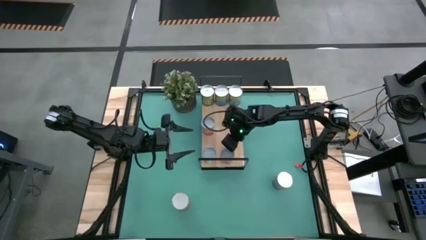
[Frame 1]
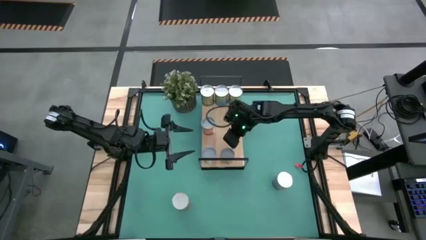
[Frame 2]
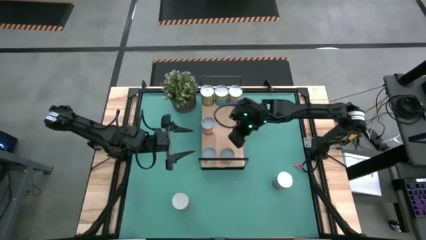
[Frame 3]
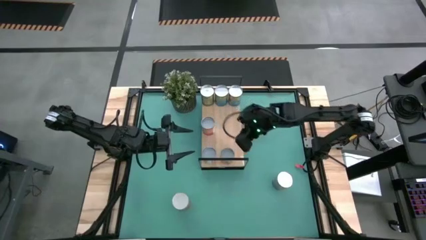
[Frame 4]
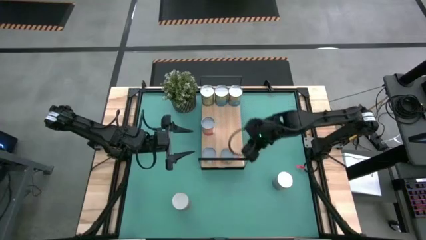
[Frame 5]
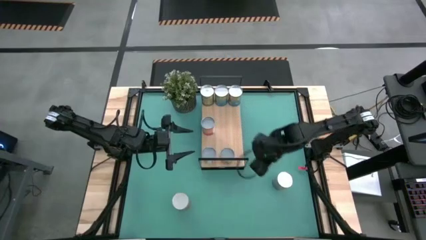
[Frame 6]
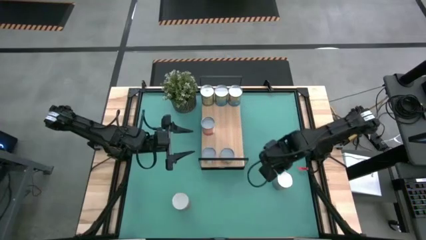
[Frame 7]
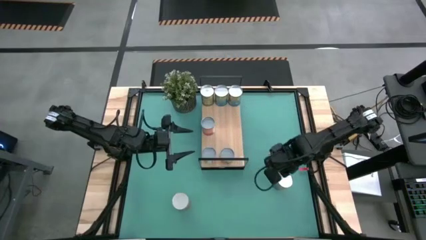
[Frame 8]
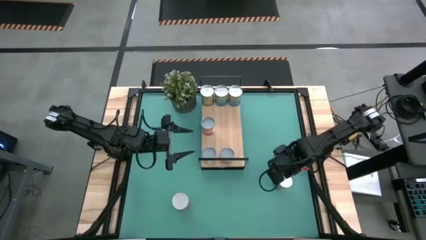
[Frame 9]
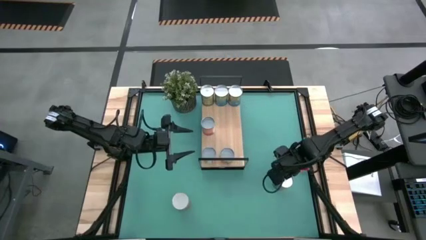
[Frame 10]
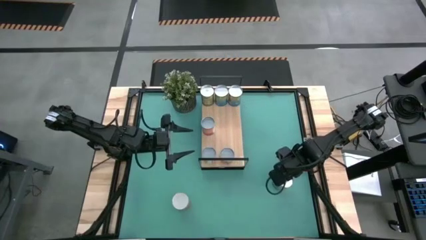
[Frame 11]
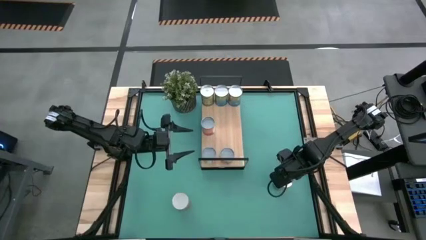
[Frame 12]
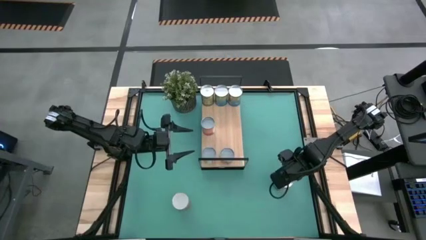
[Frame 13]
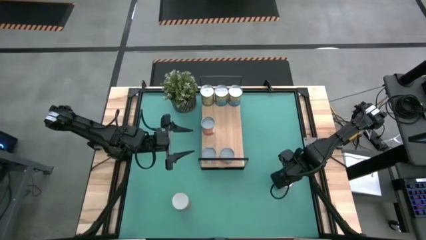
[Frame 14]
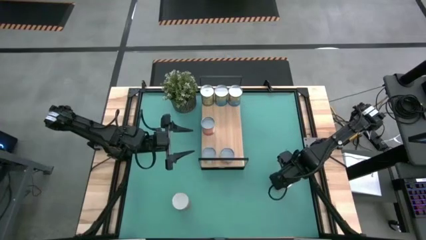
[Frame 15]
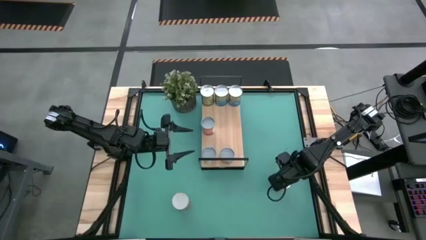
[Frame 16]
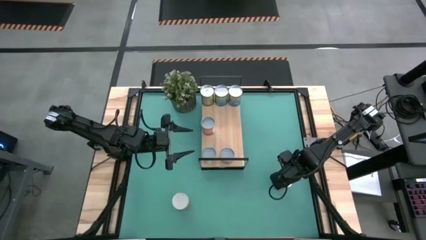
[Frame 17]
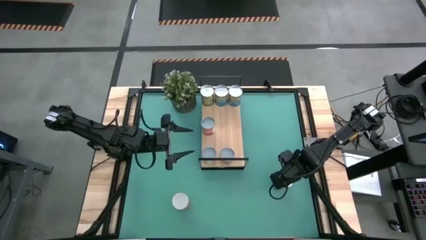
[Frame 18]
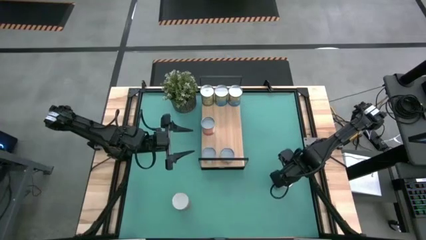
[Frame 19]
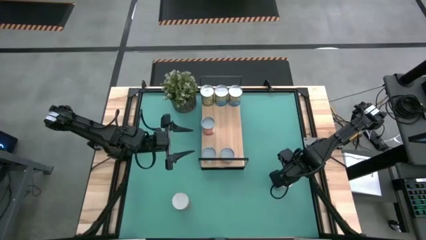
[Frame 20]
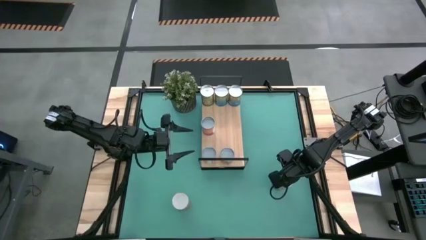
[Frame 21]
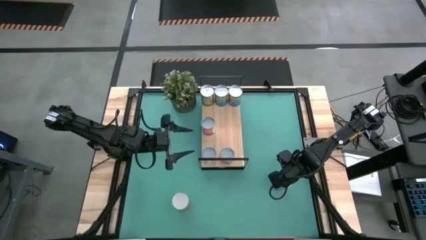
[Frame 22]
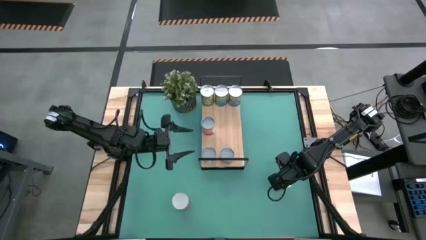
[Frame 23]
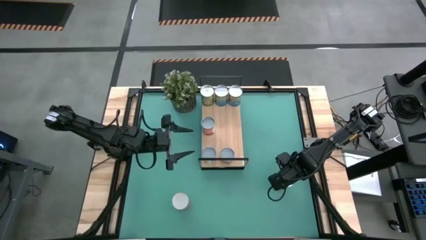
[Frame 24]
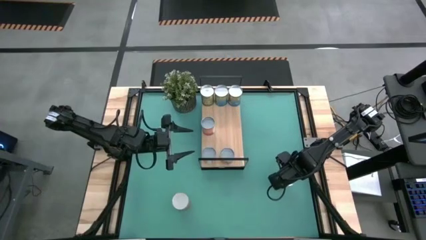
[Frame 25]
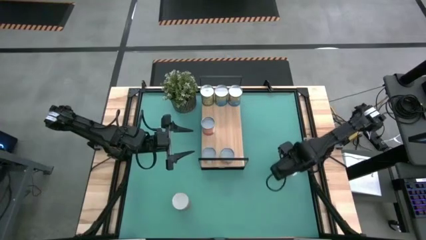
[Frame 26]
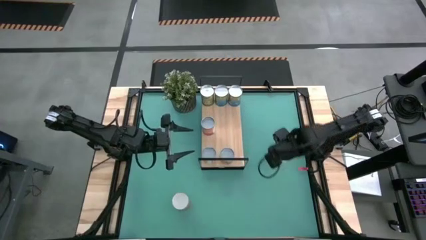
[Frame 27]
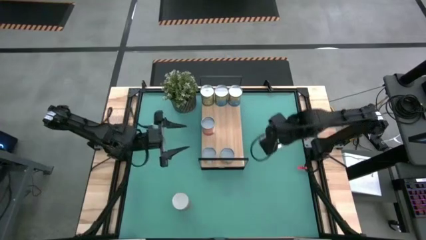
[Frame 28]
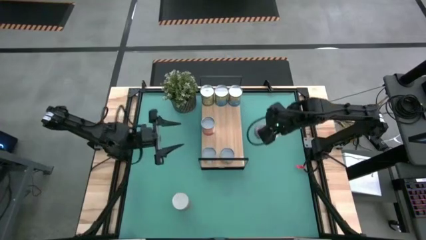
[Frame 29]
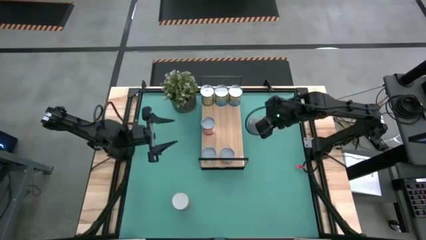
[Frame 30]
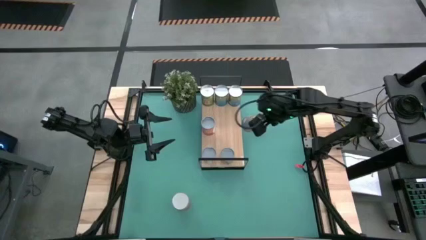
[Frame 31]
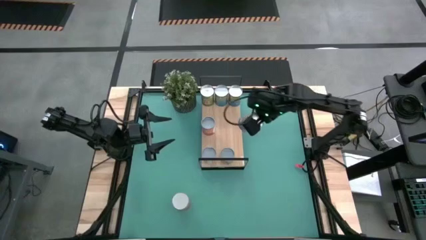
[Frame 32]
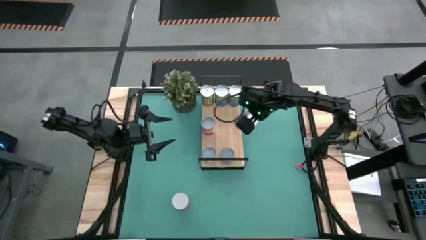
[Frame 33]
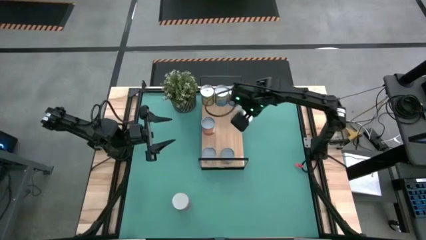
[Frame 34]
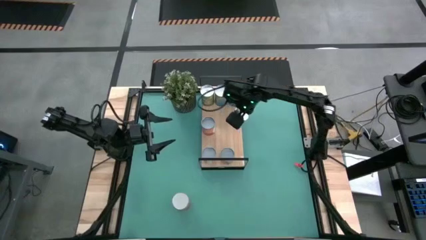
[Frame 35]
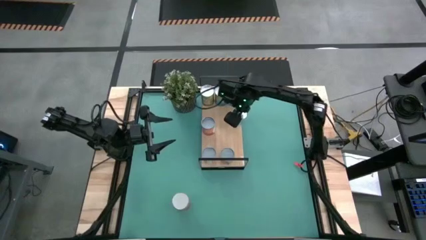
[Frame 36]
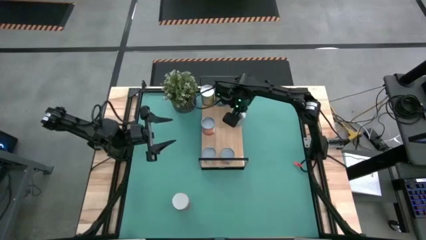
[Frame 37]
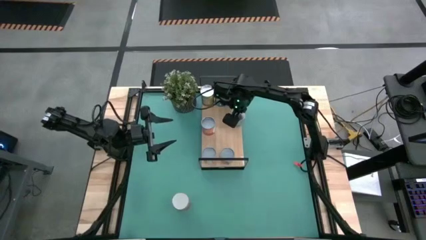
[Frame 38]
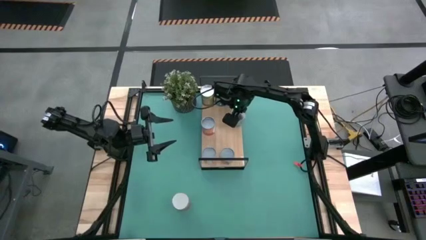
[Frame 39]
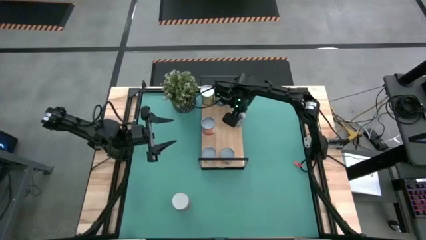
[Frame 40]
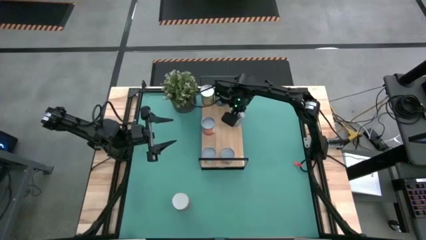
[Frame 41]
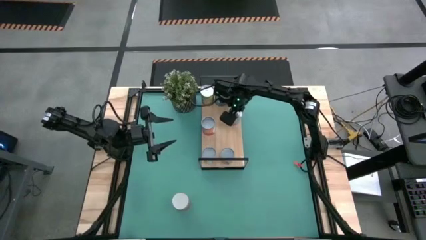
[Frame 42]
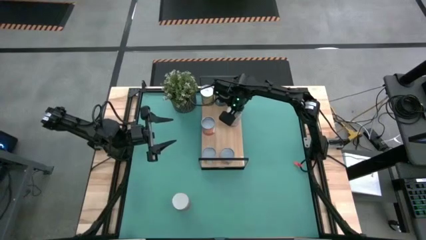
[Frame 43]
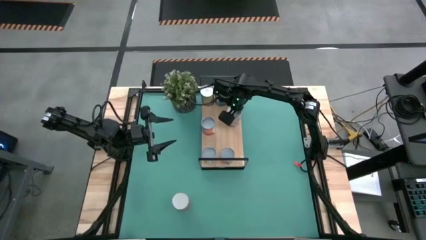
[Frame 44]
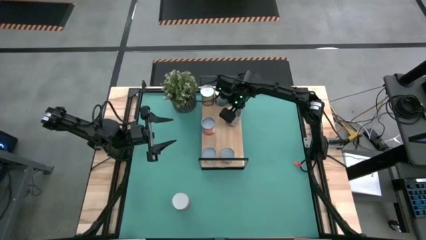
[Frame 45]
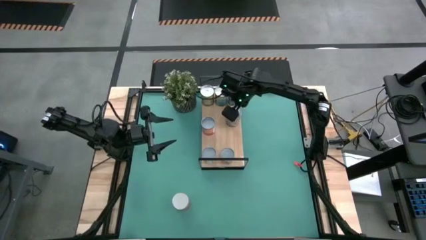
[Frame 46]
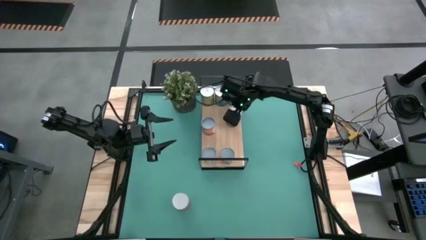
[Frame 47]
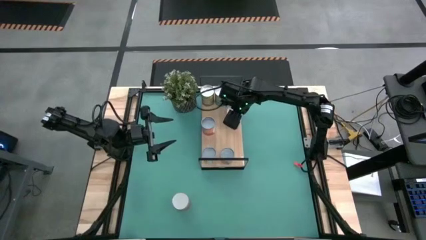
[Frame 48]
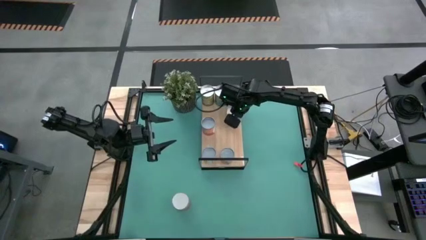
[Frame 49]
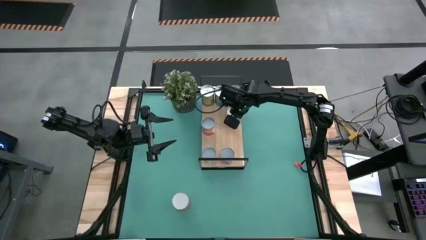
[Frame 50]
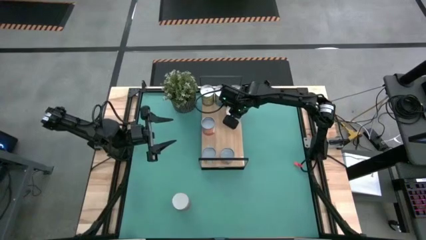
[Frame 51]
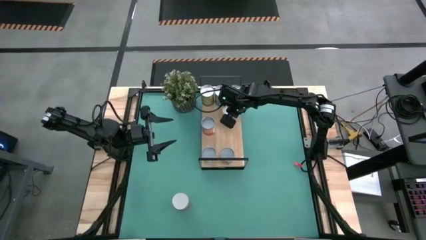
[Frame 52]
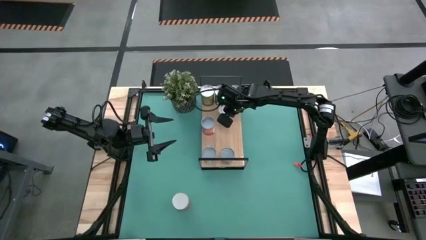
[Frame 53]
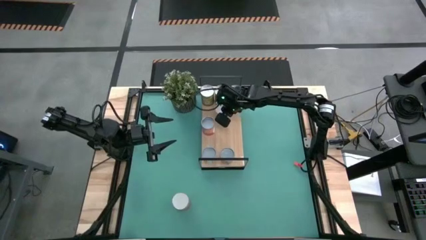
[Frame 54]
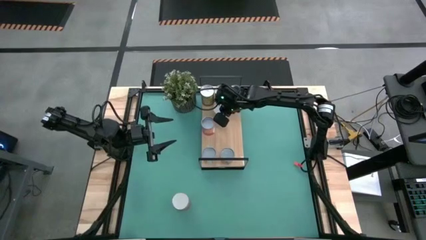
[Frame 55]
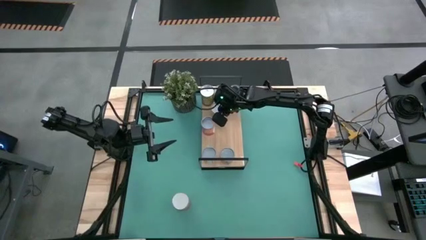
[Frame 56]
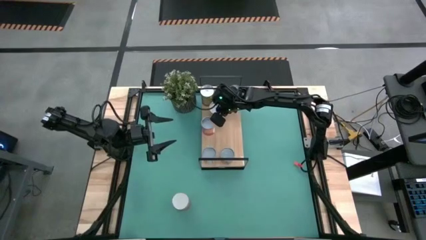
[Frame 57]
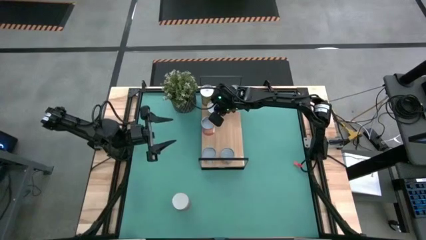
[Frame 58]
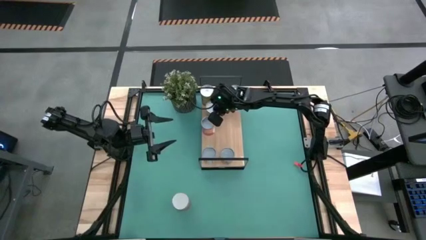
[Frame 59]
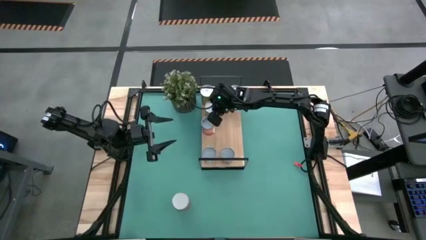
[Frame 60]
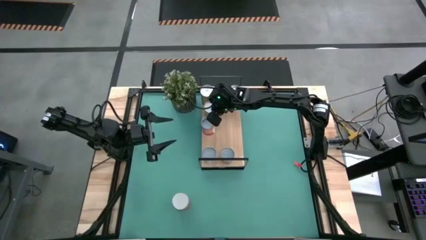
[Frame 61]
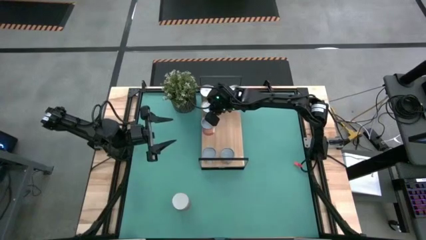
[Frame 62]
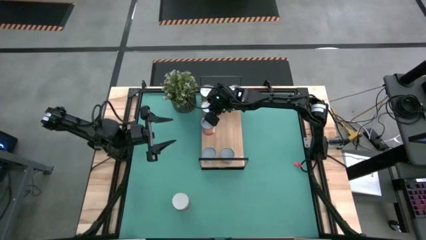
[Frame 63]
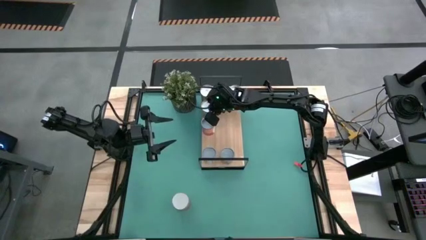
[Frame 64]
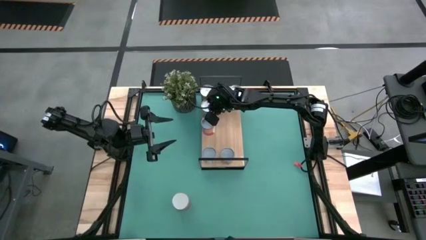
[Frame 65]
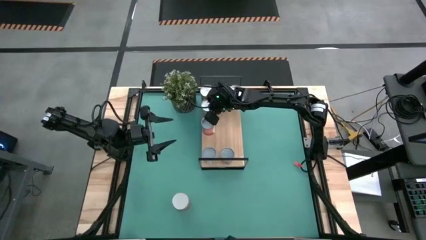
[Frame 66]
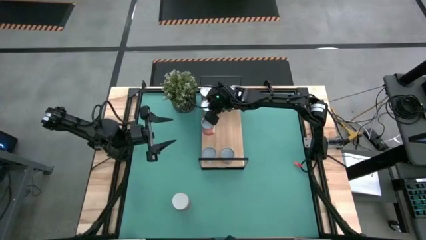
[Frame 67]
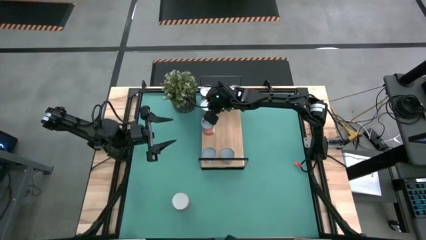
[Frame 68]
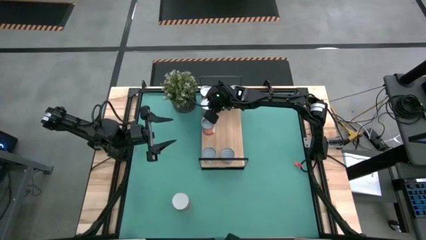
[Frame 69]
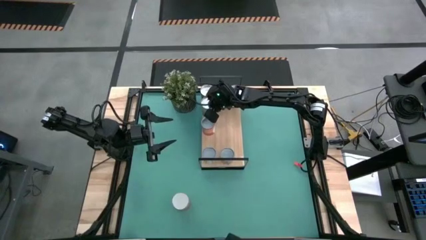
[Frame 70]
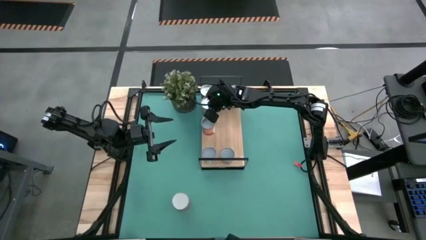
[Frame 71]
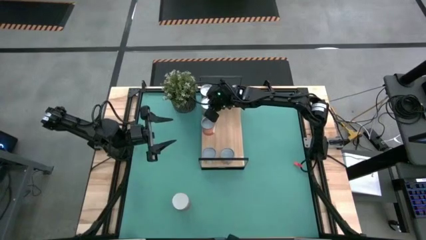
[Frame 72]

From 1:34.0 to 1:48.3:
Task: Pick and place cans onto a shelf
Put the canned peaches on the shelf

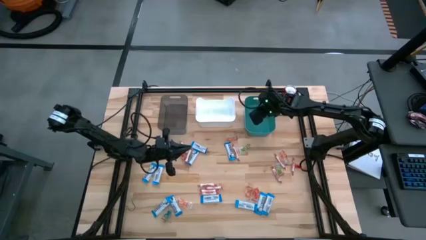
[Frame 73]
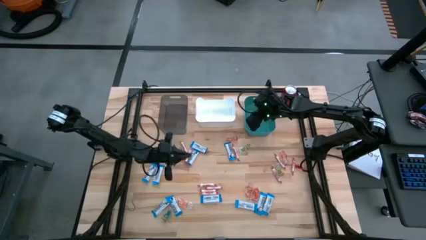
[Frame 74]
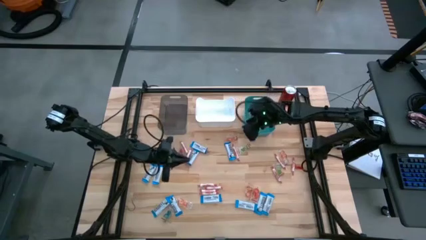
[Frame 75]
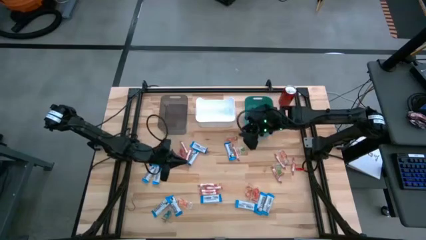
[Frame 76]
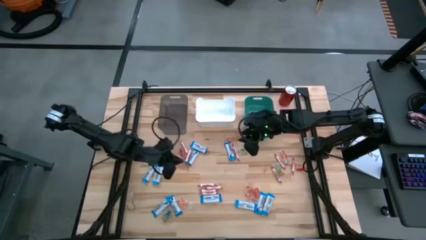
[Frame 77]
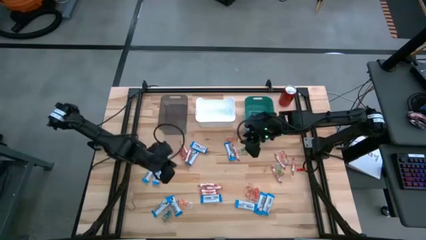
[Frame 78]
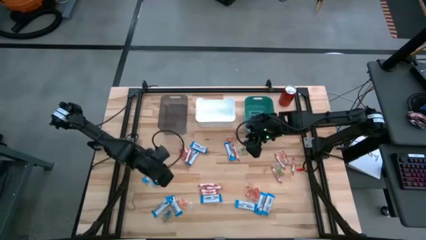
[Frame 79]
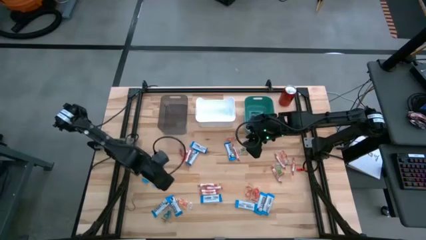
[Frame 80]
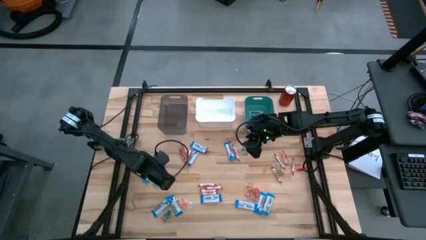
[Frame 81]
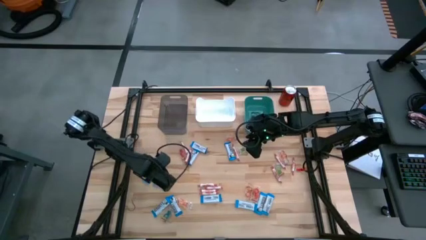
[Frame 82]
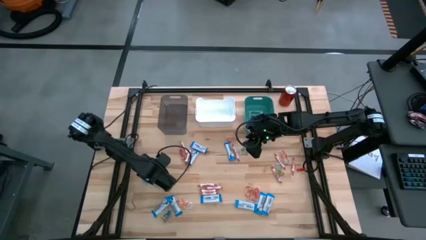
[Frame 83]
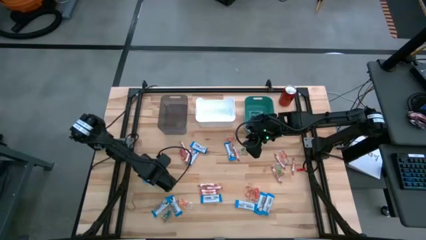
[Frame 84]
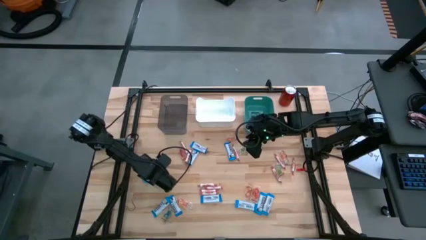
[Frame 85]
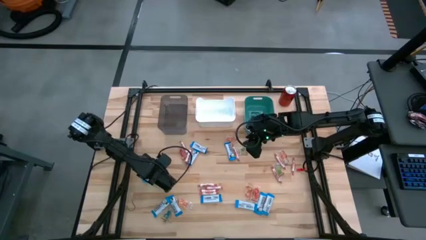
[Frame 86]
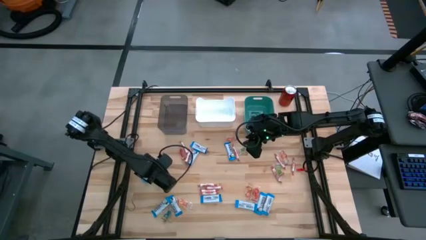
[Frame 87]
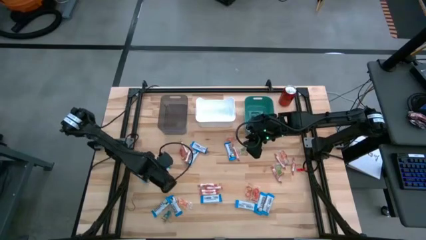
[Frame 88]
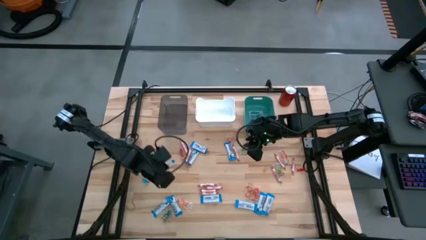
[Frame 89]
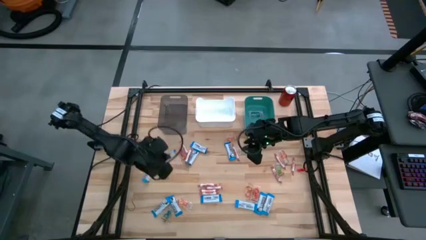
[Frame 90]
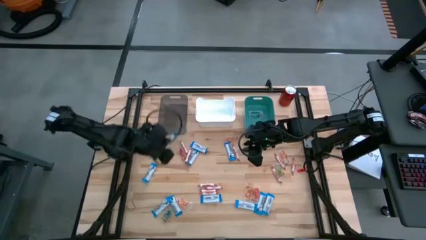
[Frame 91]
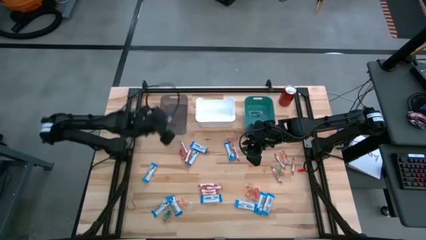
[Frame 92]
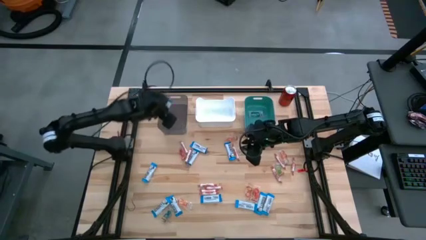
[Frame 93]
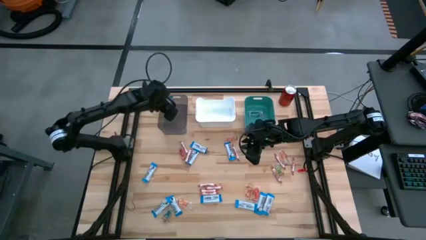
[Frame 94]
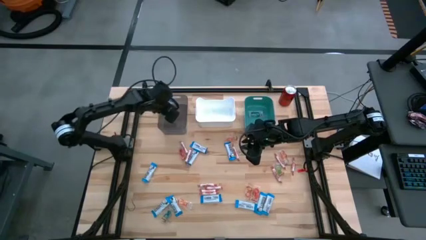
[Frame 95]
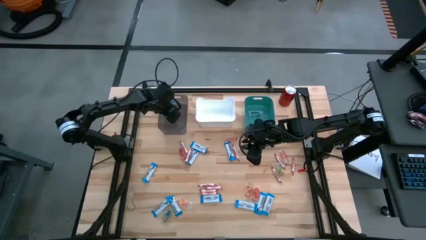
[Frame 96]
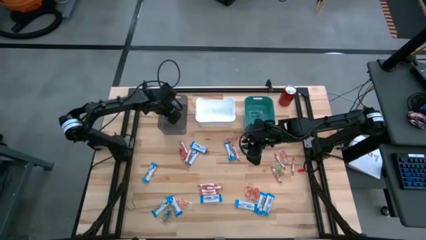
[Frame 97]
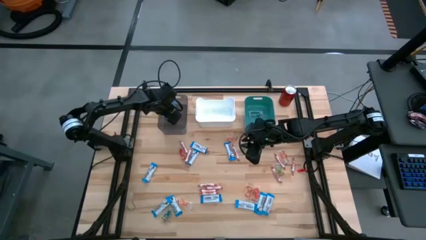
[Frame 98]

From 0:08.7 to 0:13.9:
Task: Sort candy
Put the white chocolate into the gray bin
